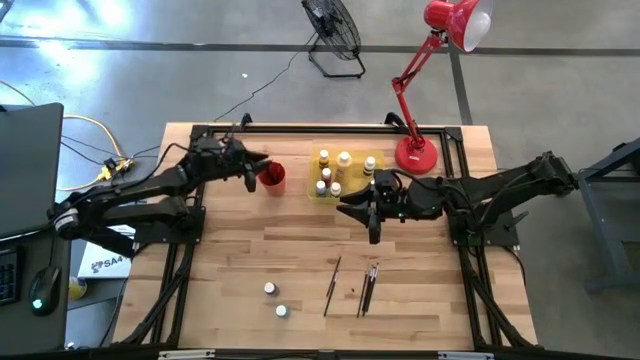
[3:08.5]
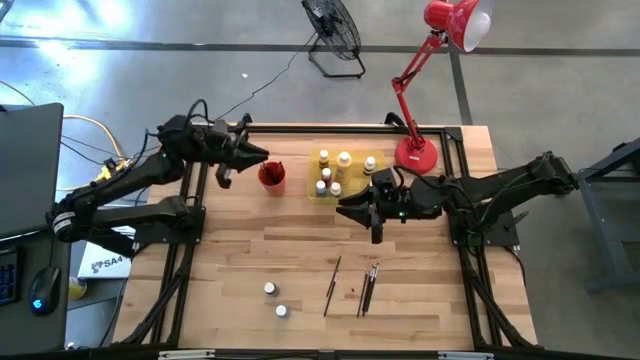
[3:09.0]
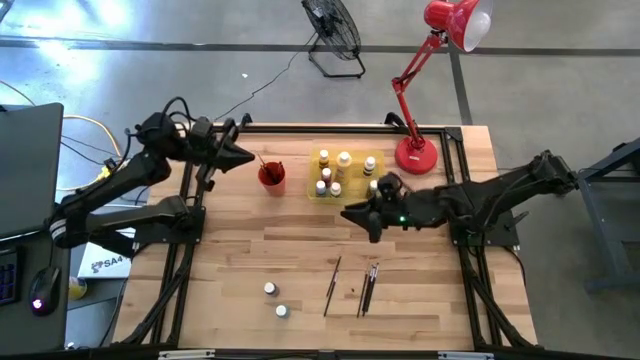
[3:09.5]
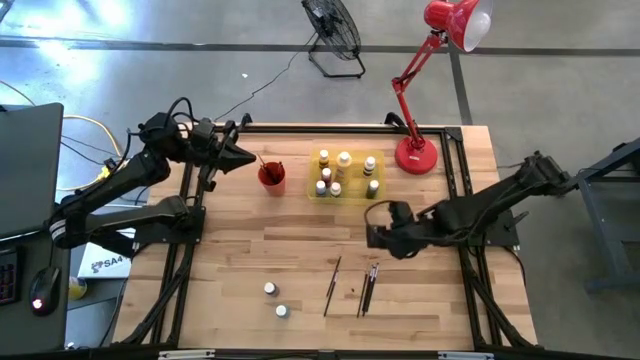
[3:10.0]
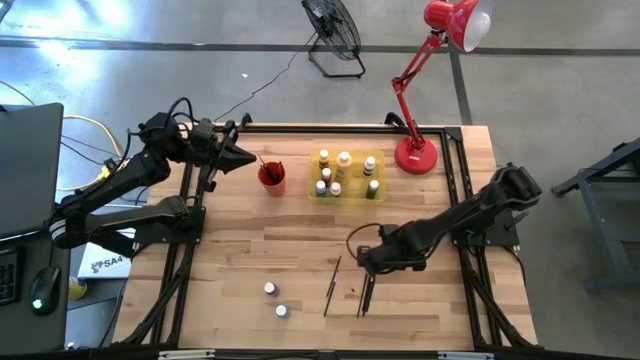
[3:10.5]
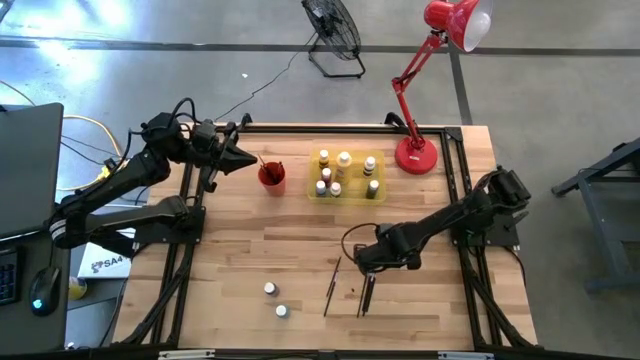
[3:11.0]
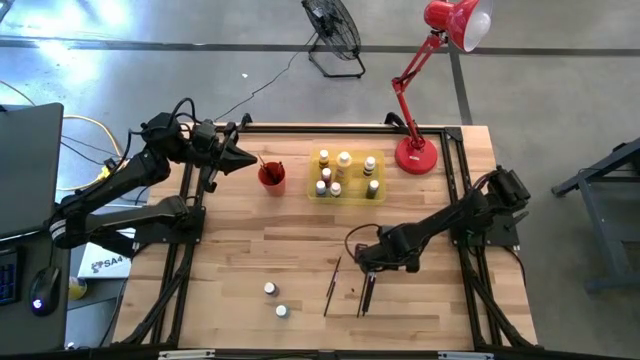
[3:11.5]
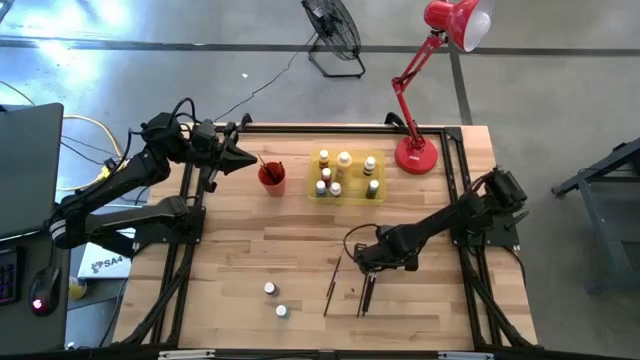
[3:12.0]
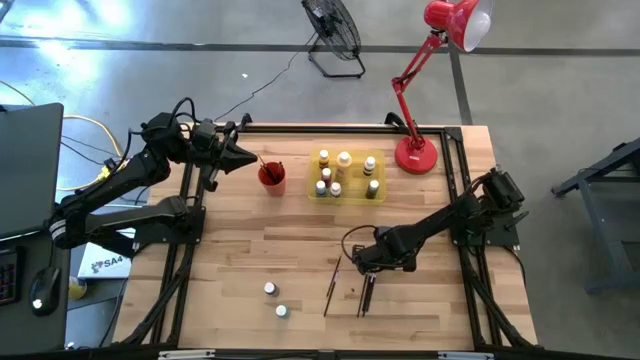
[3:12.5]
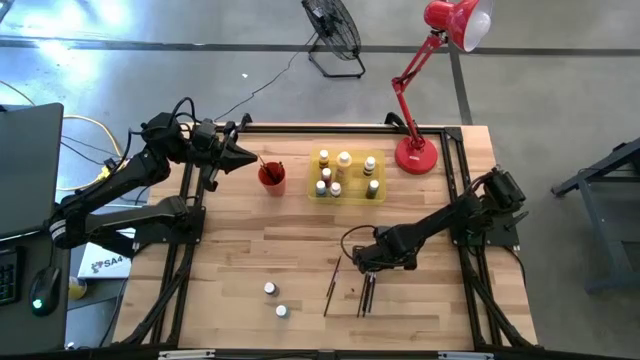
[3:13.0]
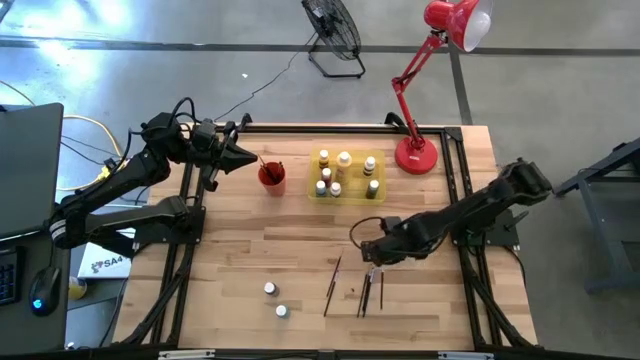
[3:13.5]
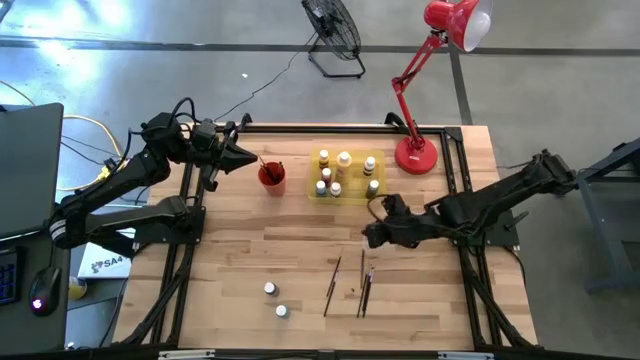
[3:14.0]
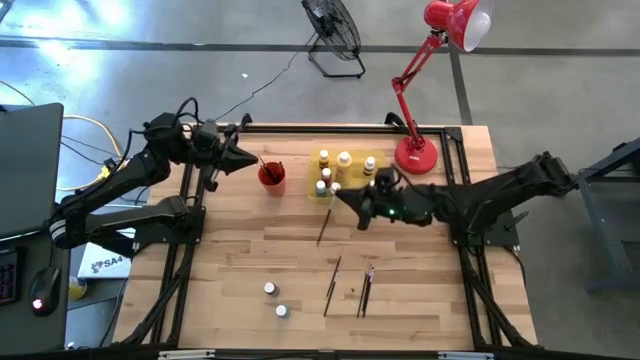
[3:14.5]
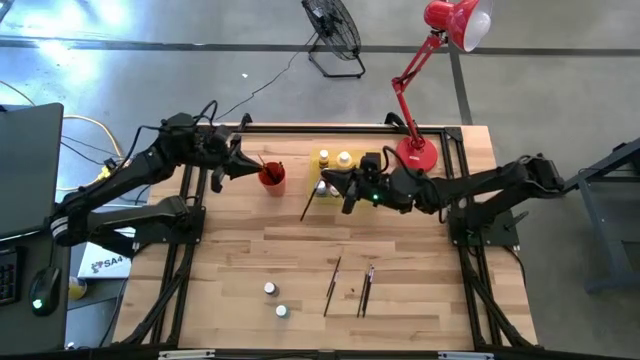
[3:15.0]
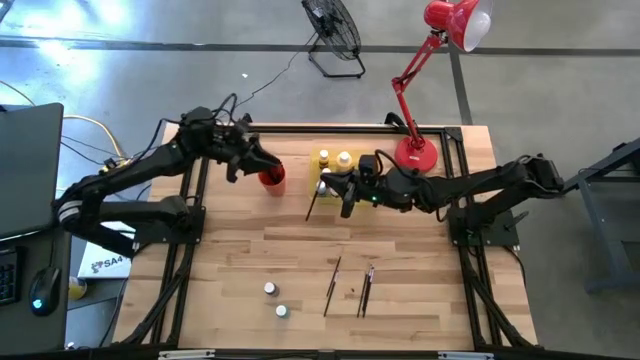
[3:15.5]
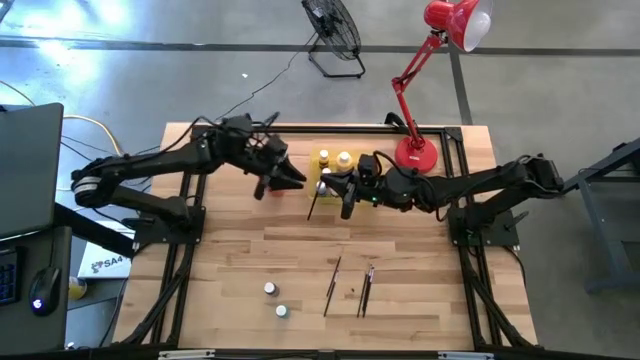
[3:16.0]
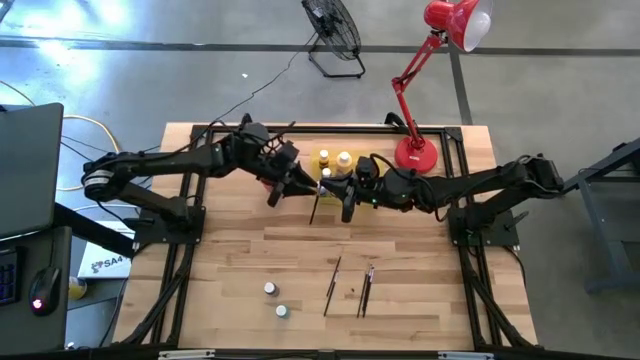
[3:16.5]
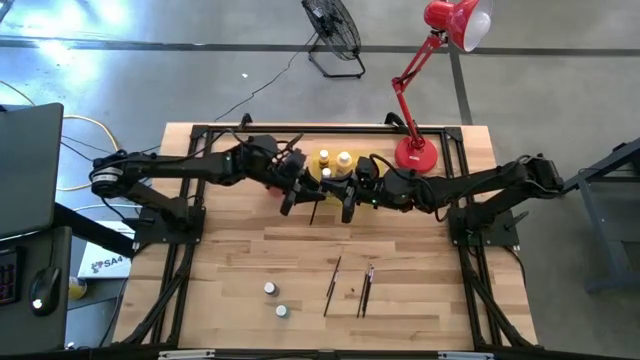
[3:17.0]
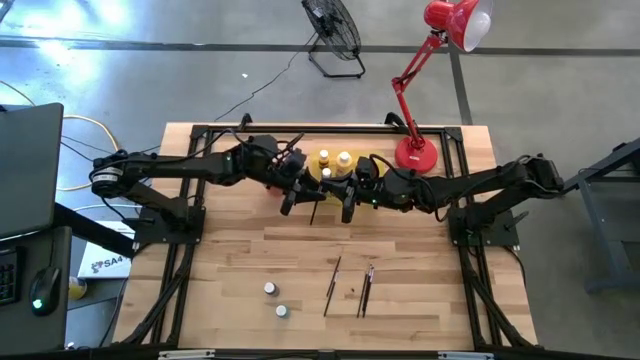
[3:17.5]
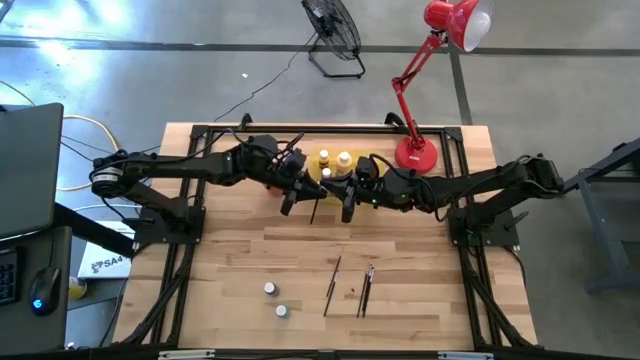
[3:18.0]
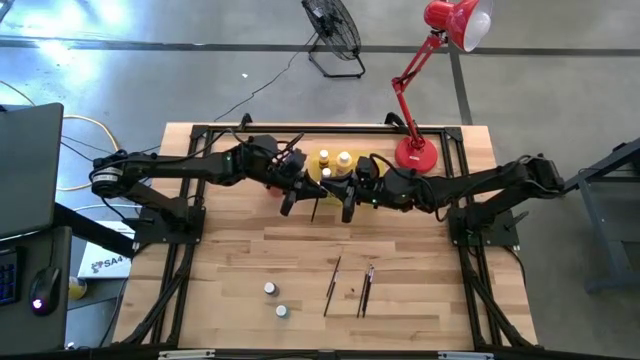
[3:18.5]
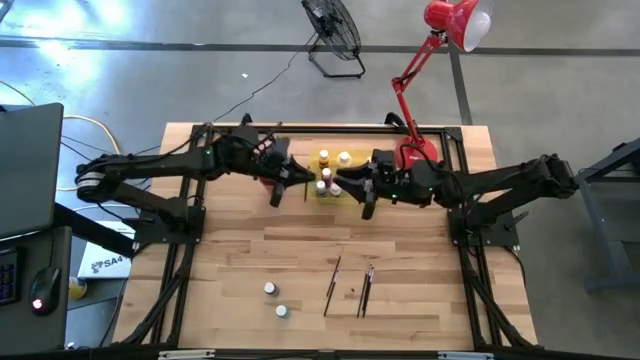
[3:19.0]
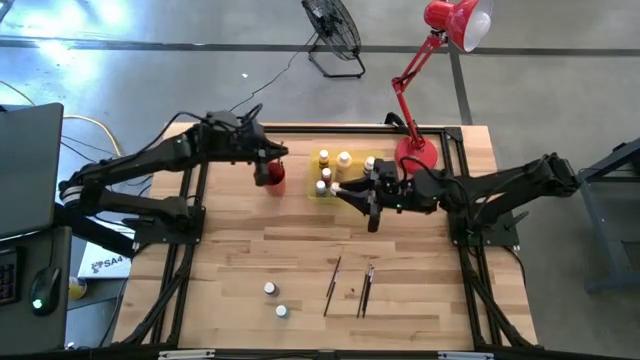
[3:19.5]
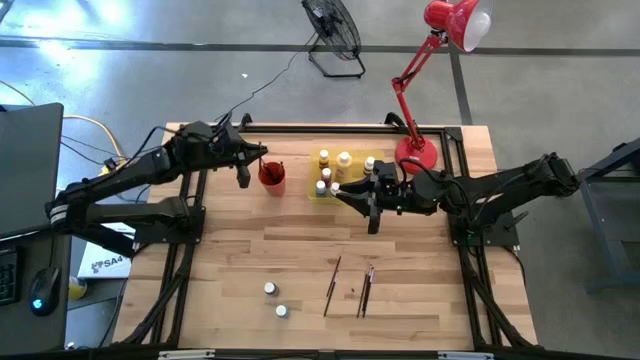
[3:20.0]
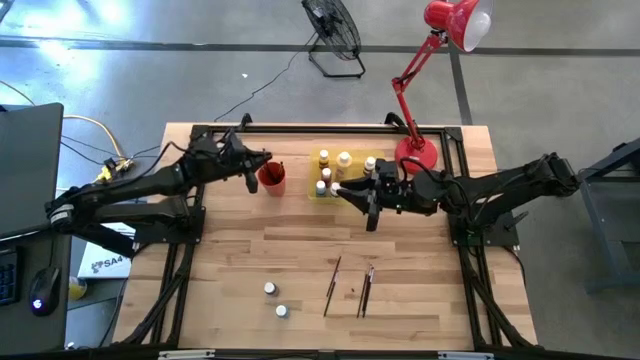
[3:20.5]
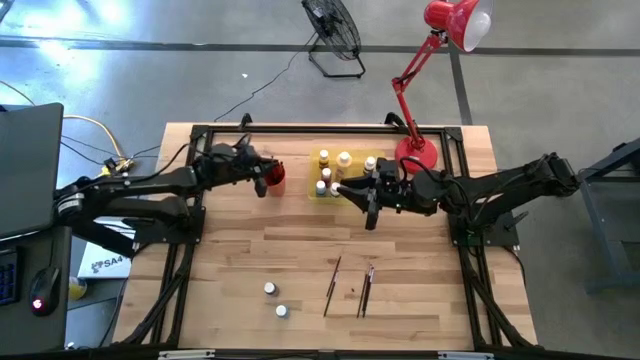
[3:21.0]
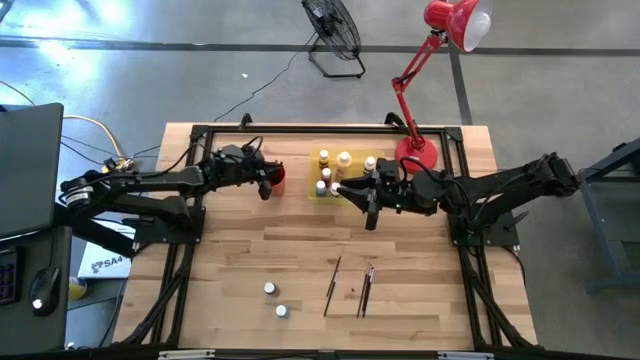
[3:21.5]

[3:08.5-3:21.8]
Task: Pick & Place Paint Supplies
Put the silver paintbrush into the orange cup

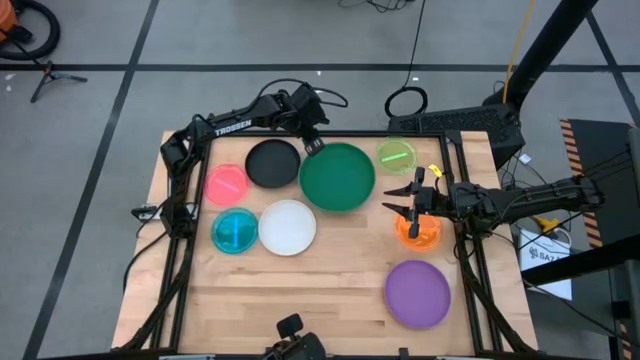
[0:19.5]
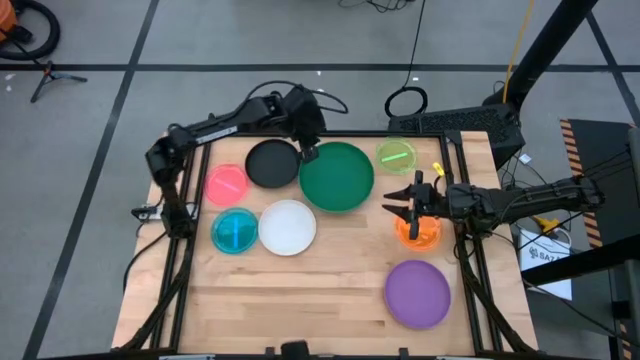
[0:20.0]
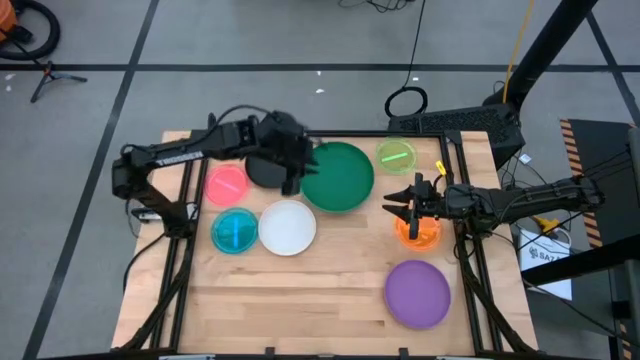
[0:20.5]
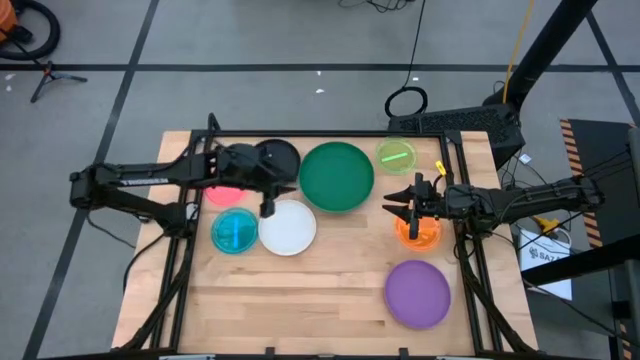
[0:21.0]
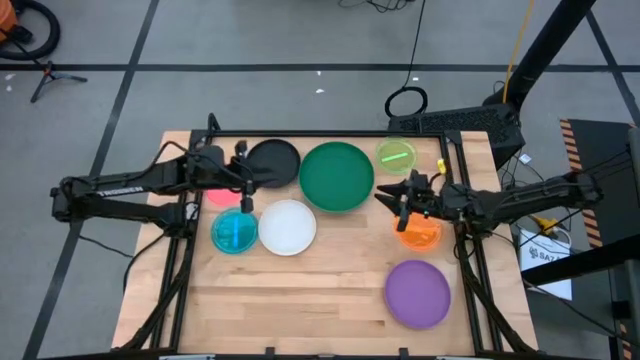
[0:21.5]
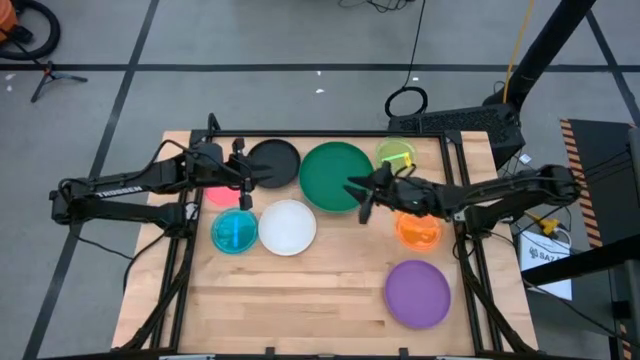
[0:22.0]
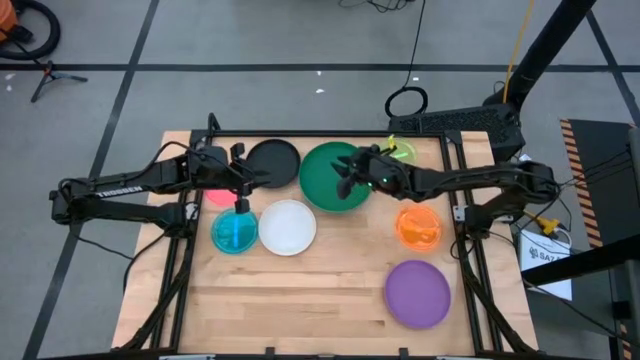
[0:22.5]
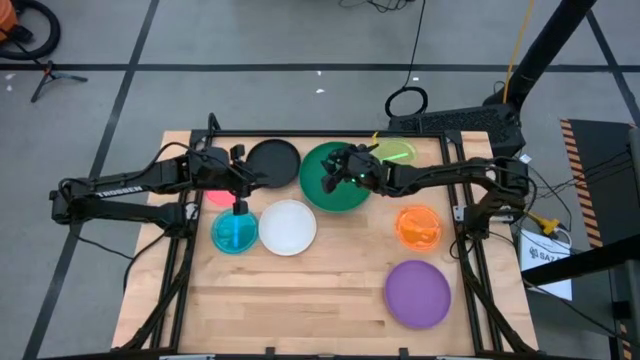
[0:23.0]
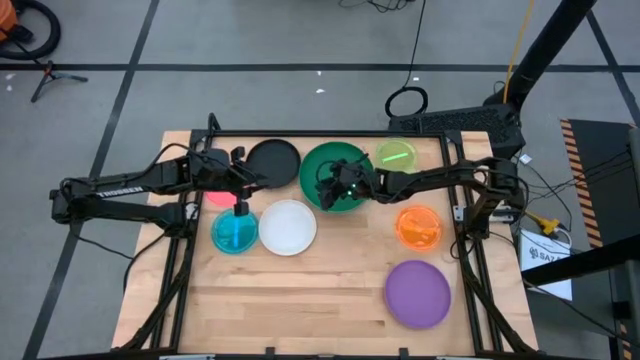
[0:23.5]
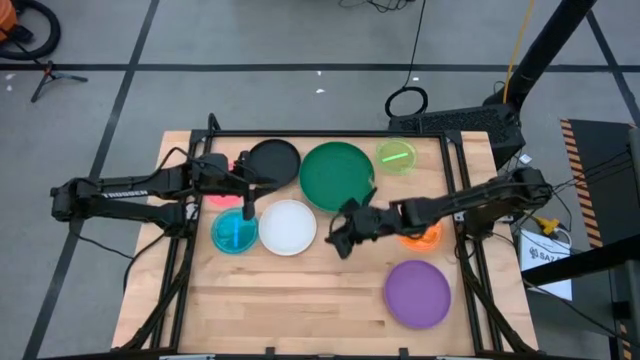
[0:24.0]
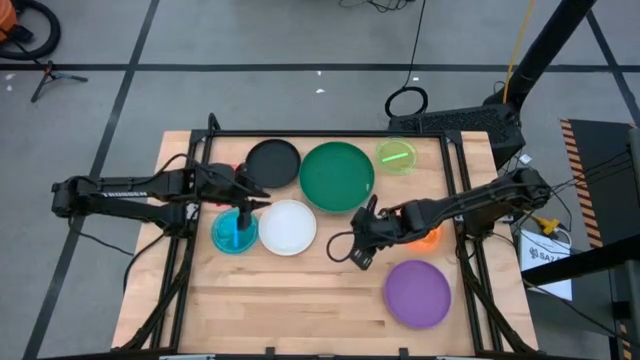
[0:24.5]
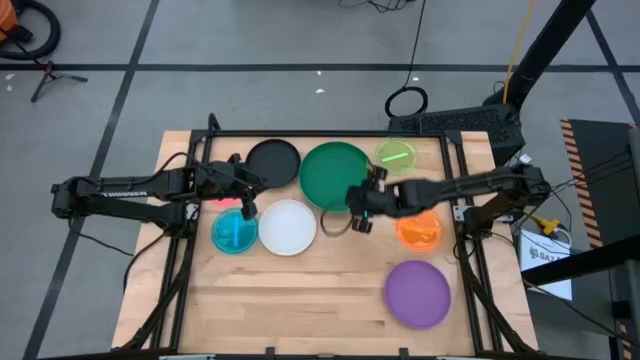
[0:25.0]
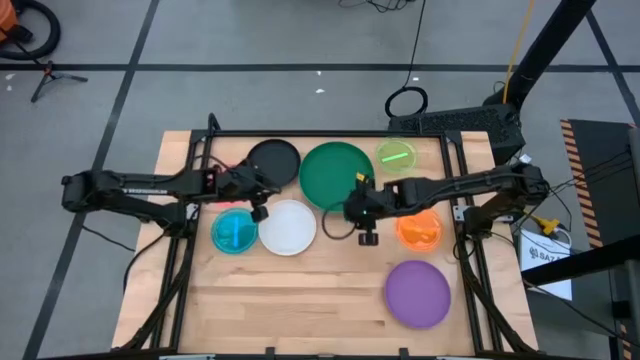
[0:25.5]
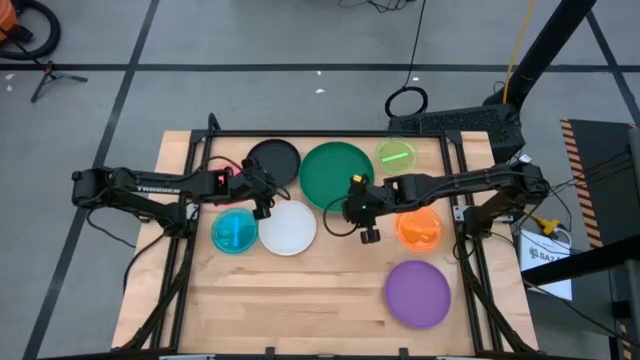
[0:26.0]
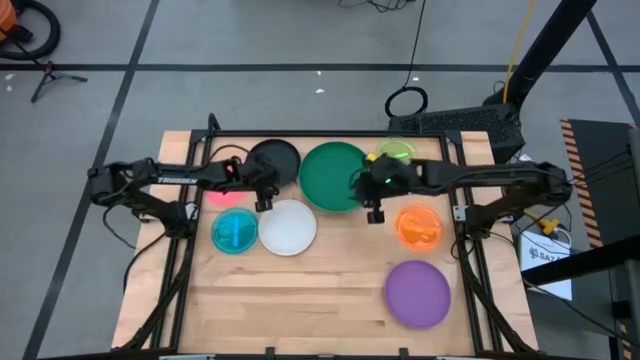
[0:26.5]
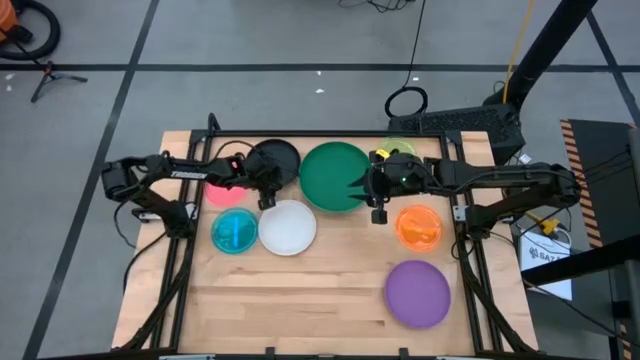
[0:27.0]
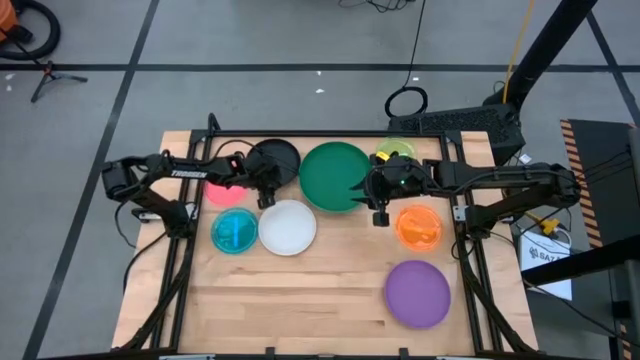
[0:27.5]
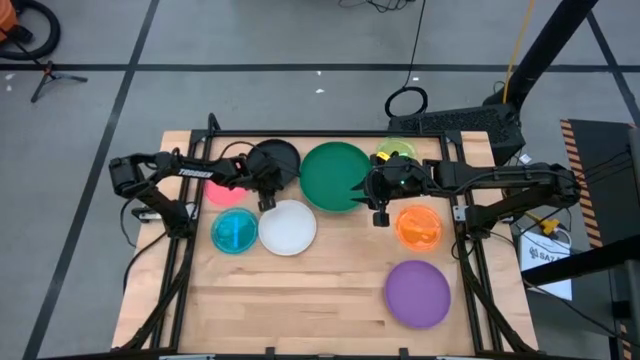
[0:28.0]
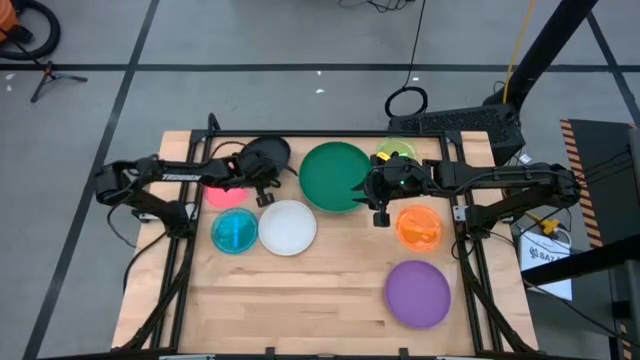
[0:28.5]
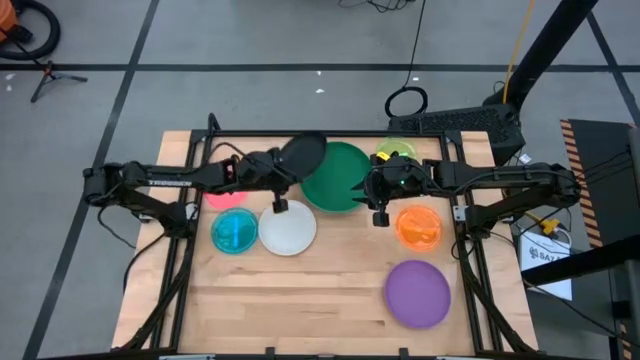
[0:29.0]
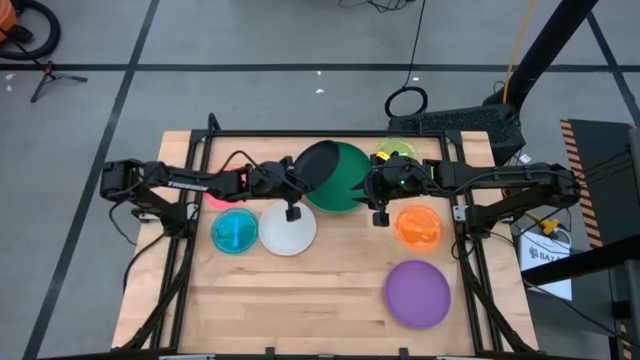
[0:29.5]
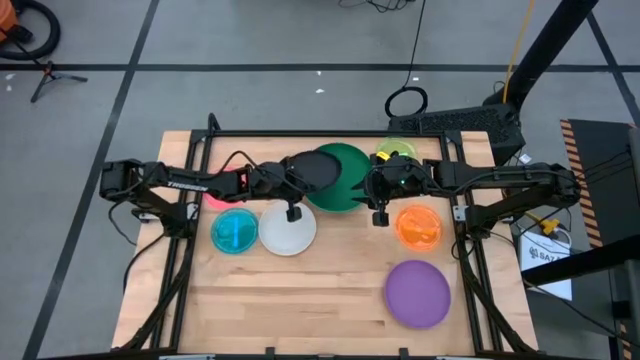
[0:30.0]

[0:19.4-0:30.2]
Task: Stack plastic plates
Stack the black plate on top of the green plate
